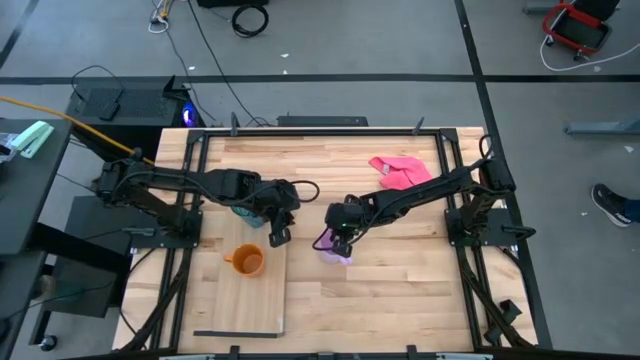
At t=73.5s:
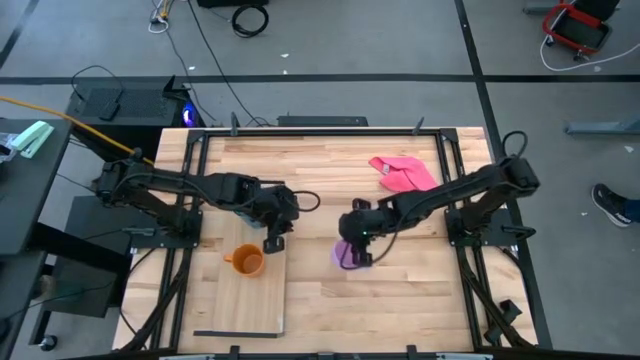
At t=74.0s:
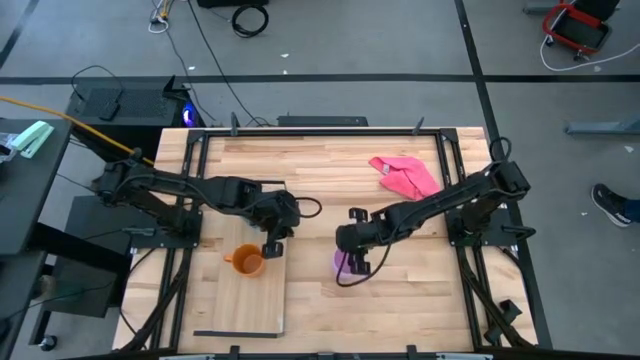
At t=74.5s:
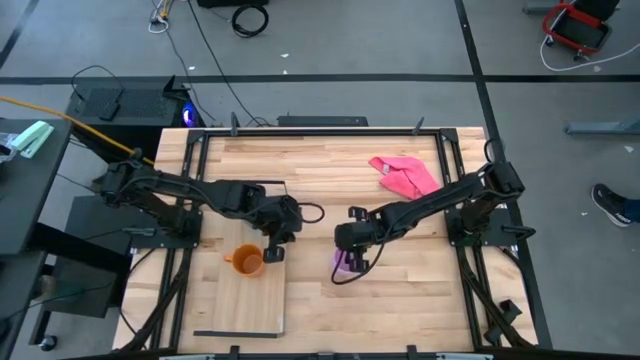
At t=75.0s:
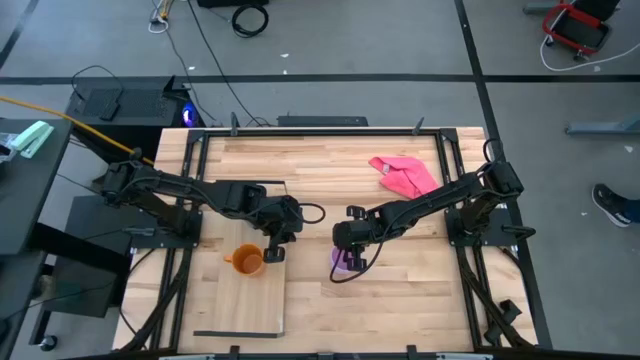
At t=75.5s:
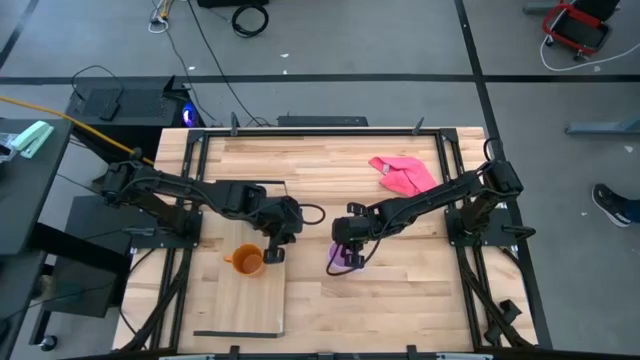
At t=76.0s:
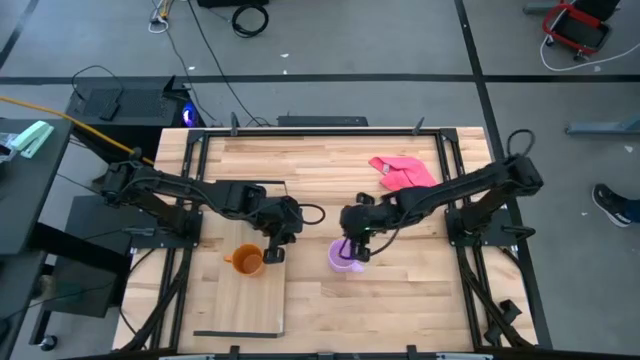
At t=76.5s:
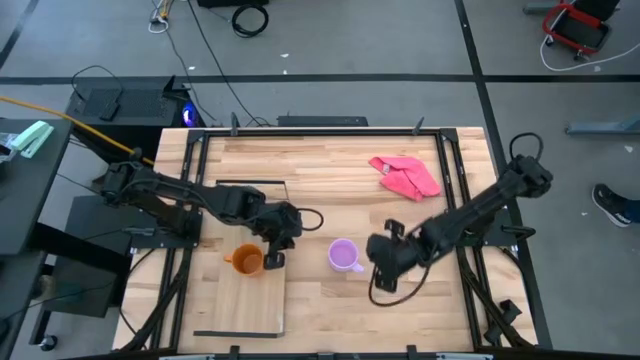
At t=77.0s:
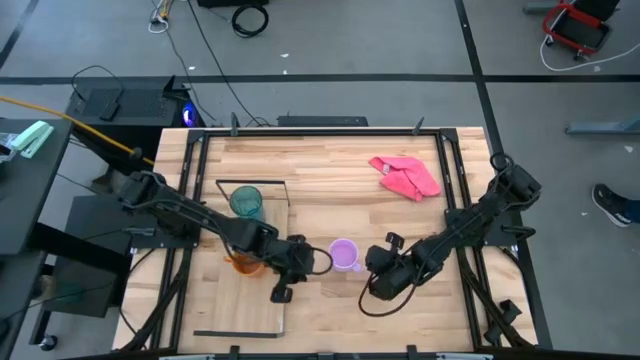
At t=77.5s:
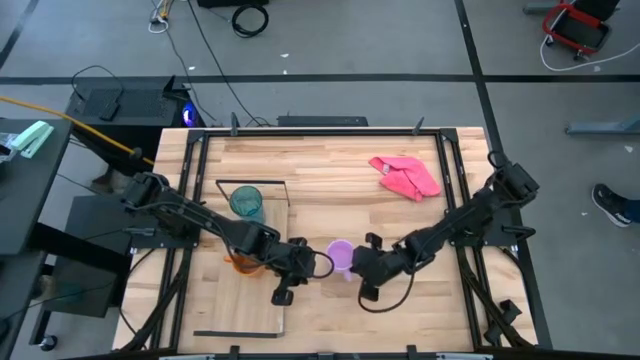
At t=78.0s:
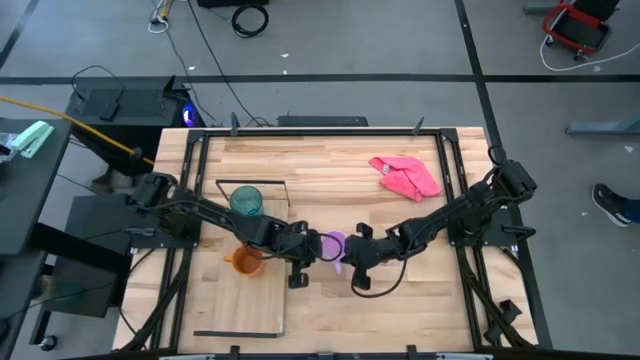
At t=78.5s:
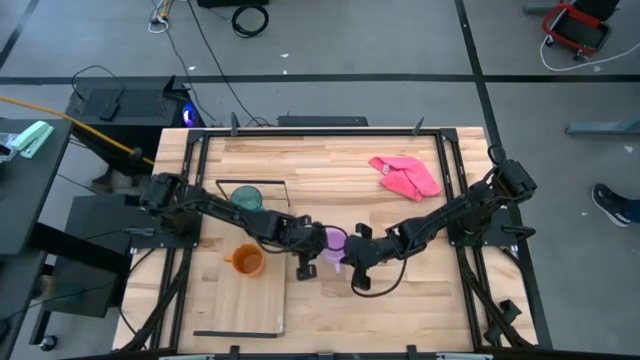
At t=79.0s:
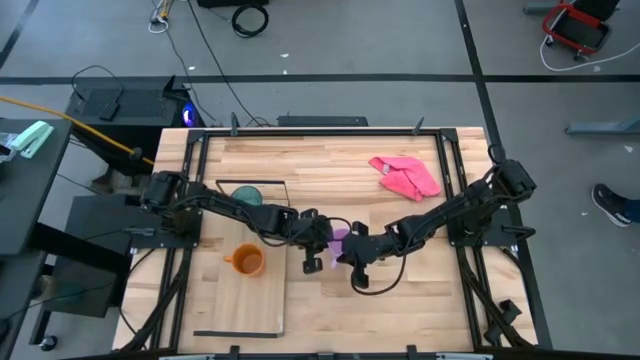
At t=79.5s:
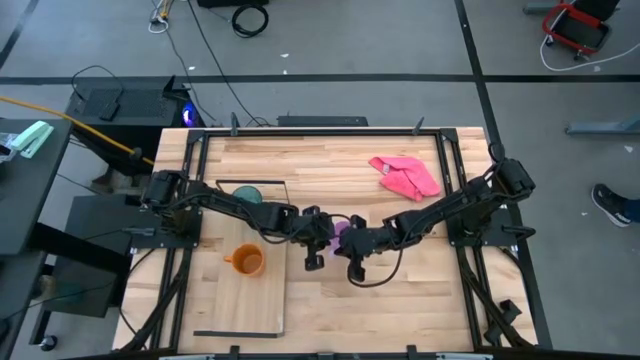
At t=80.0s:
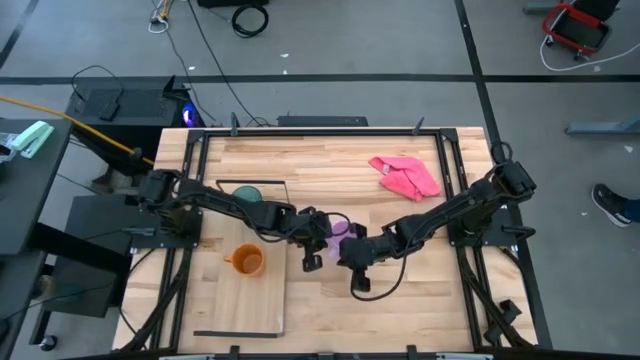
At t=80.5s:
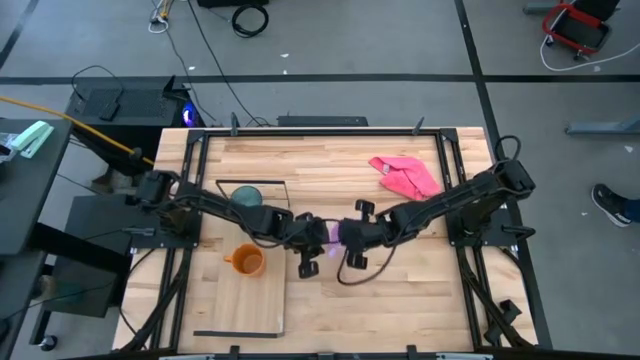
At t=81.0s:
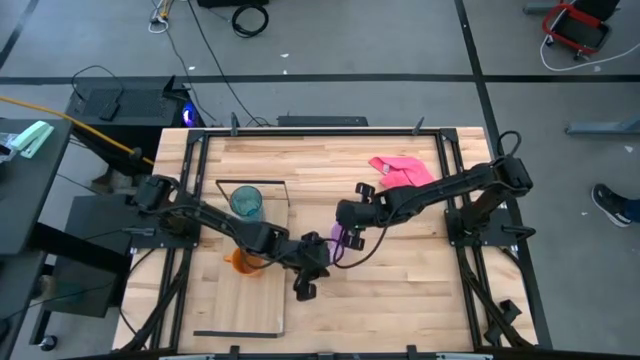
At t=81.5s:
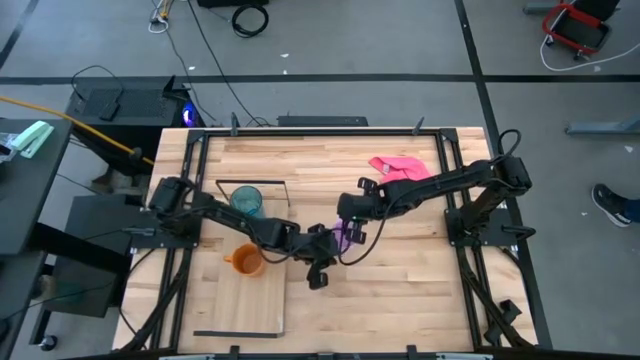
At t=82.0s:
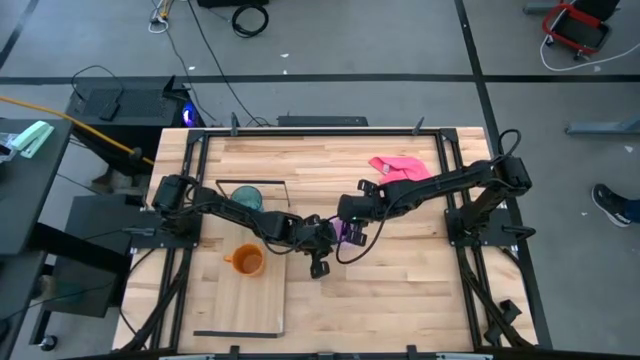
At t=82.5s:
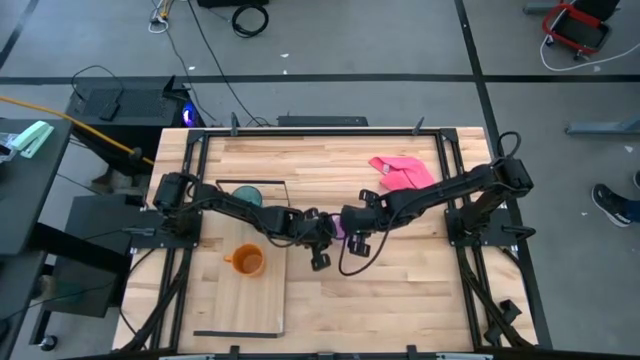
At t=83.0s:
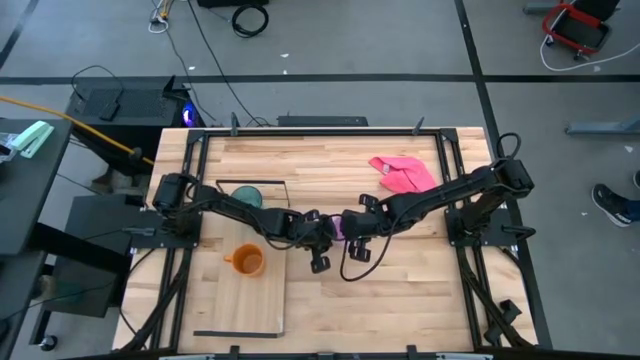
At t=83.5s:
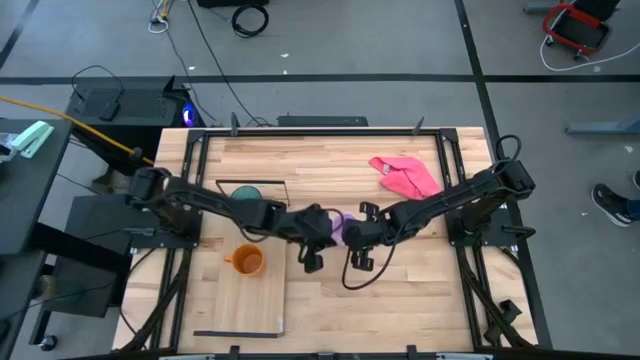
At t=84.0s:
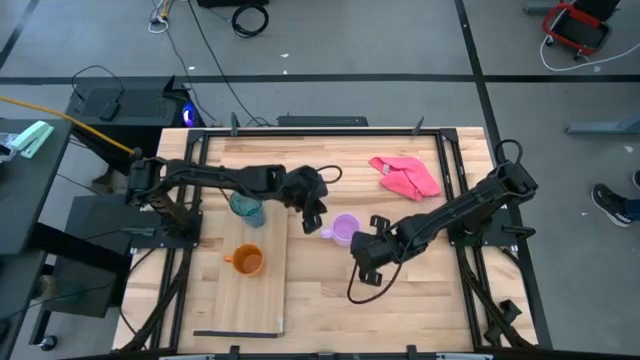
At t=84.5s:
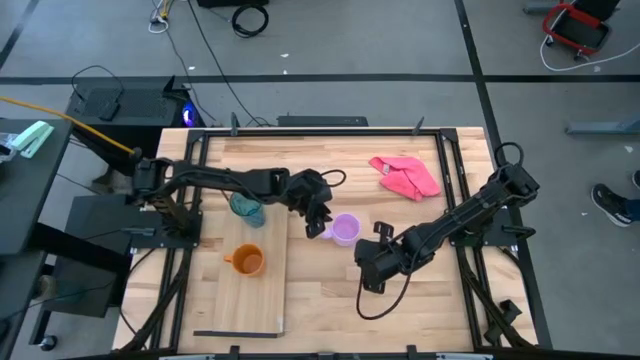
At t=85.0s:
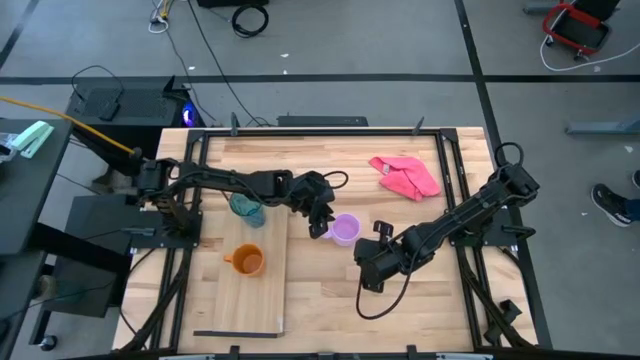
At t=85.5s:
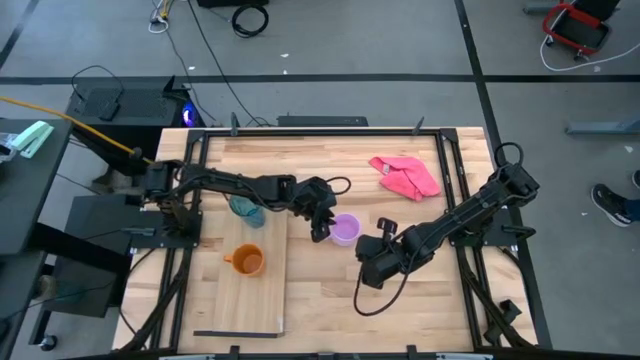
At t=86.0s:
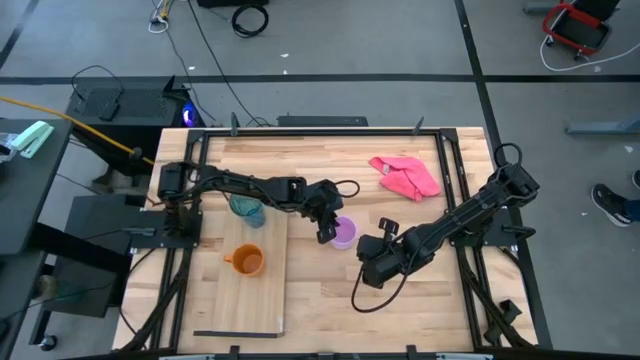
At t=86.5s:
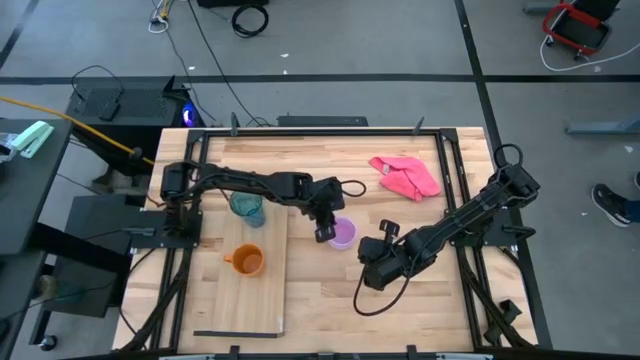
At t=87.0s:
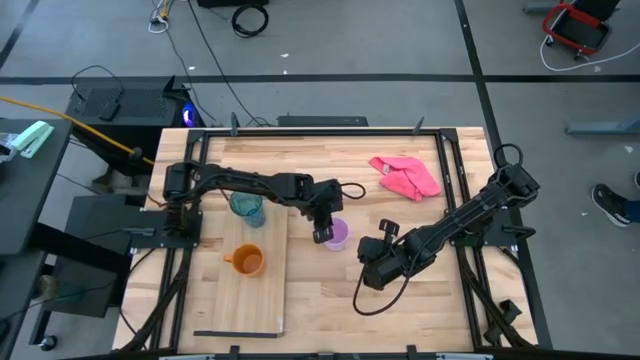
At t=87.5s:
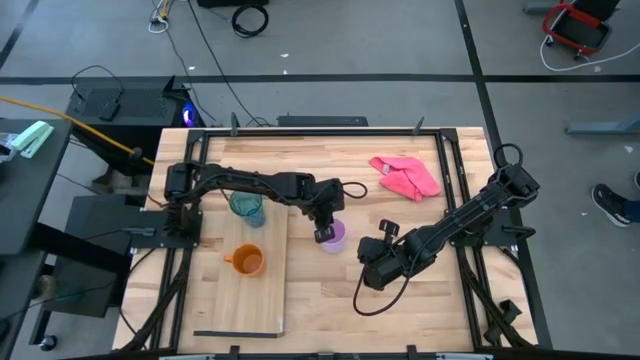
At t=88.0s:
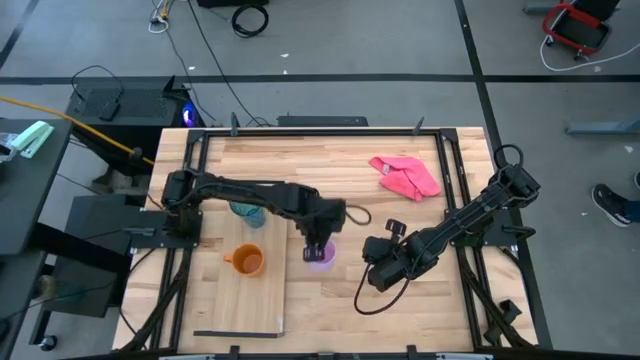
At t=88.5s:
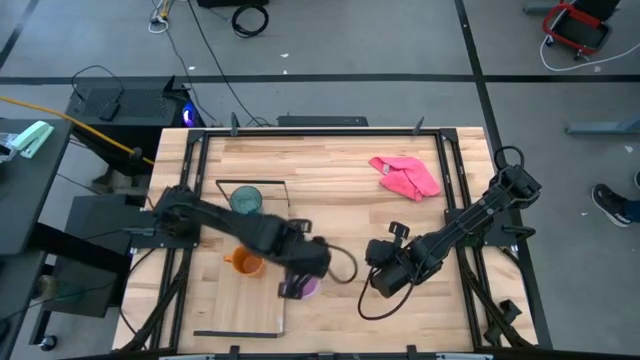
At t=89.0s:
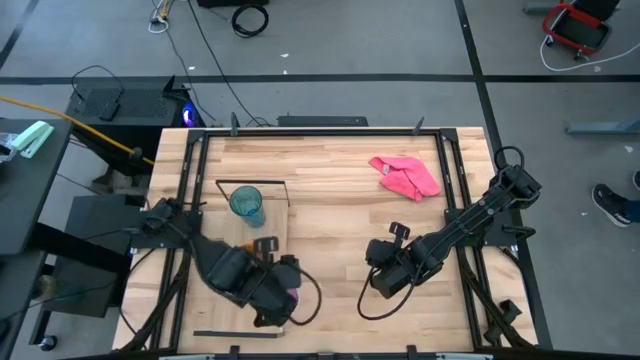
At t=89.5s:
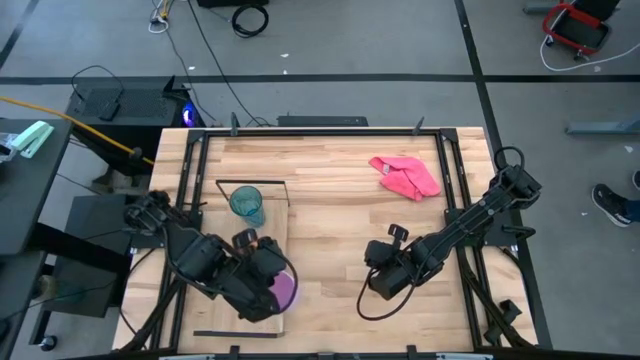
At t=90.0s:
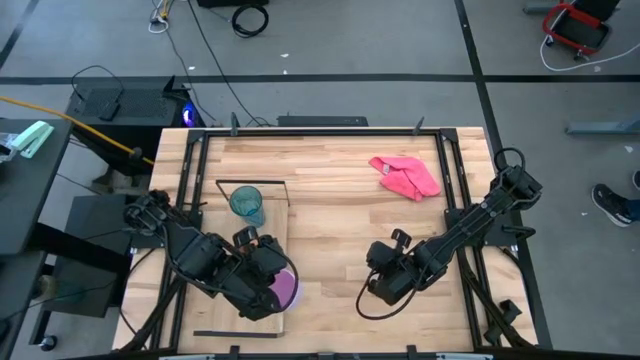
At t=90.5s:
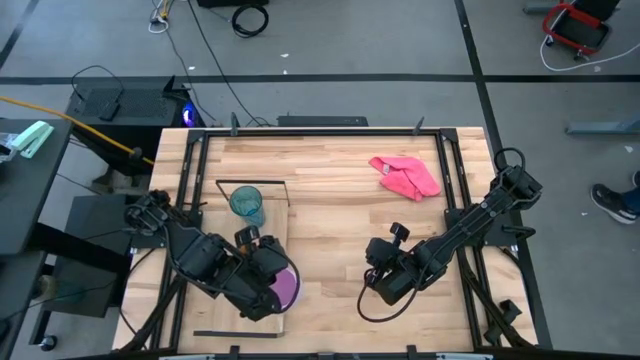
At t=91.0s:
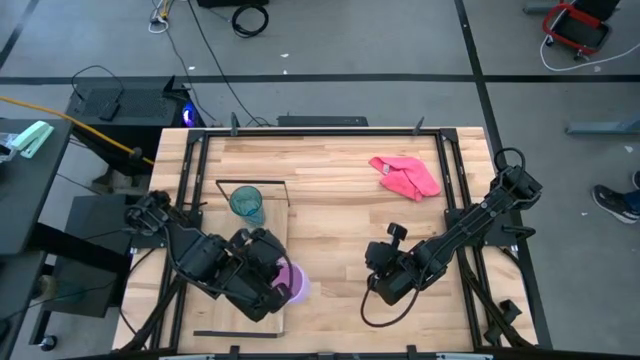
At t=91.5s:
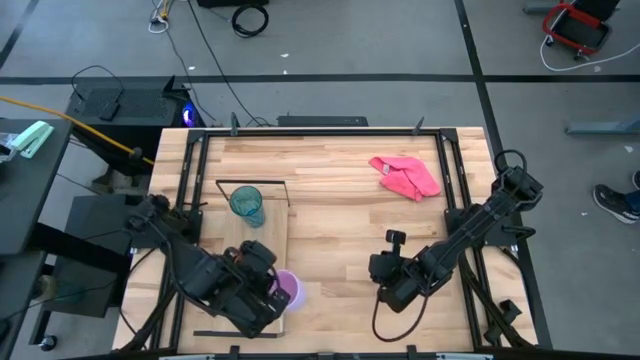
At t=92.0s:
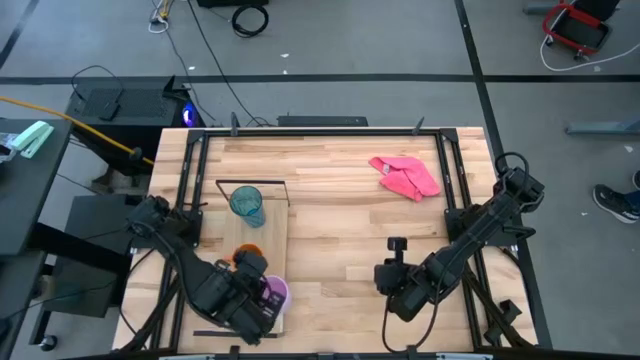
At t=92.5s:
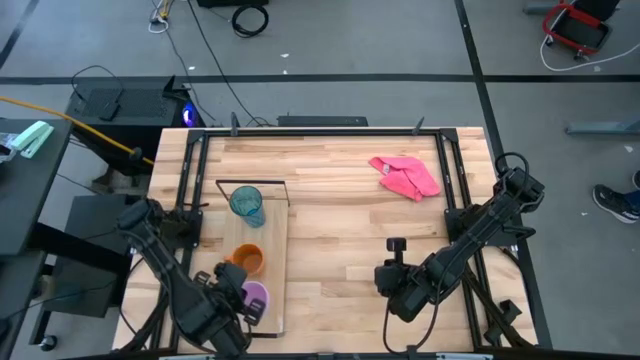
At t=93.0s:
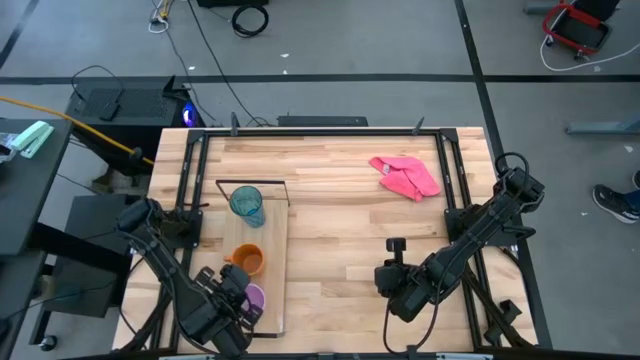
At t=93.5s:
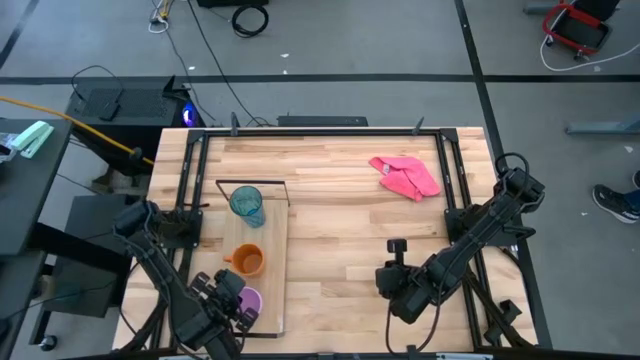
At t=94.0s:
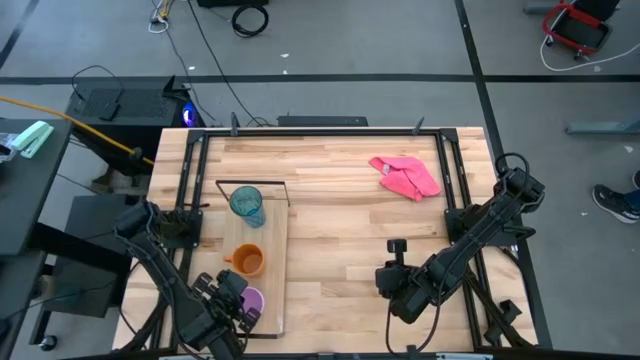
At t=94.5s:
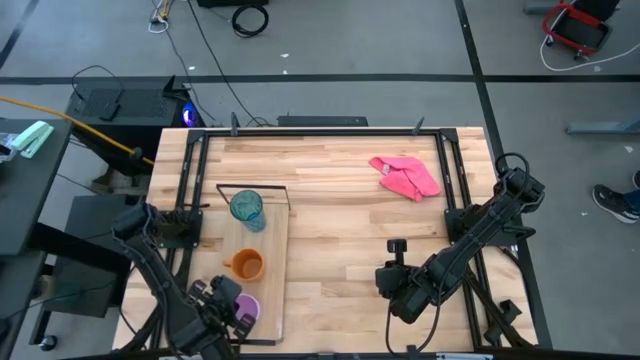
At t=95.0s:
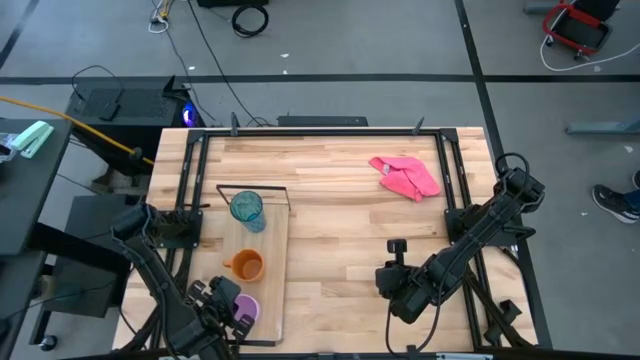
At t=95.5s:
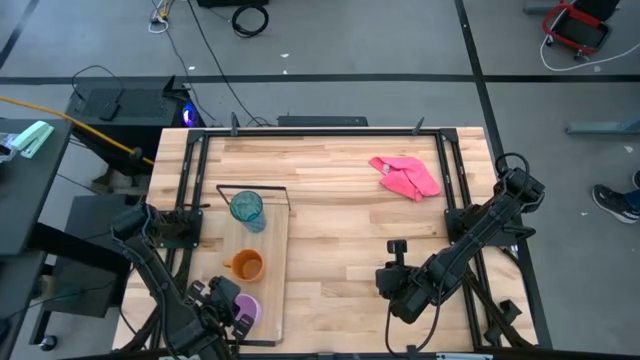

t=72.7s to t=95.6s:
Task: Stack small to large cups/mugs on shelf
Put the light purple mug on the shelf
